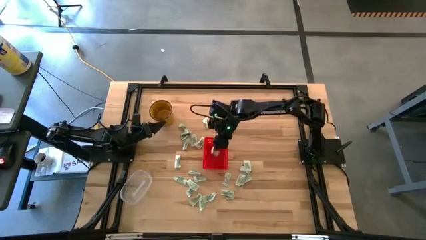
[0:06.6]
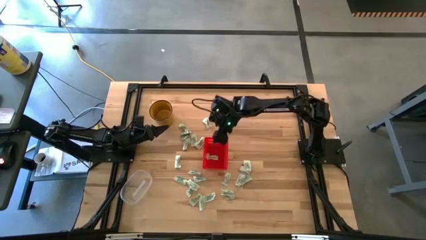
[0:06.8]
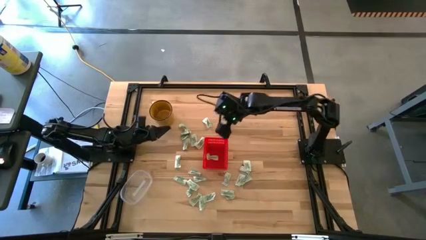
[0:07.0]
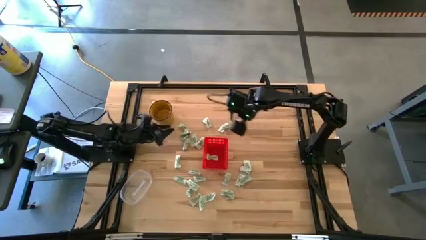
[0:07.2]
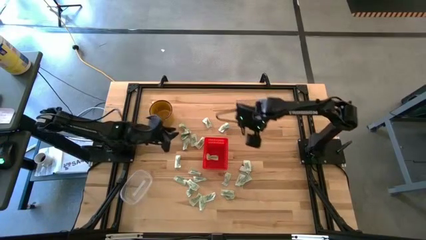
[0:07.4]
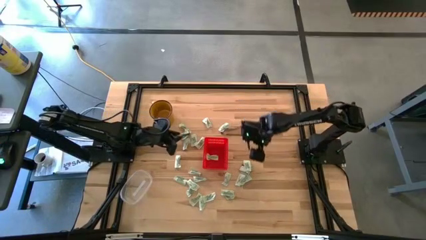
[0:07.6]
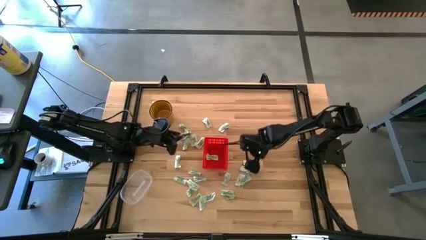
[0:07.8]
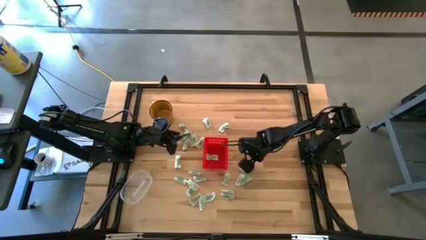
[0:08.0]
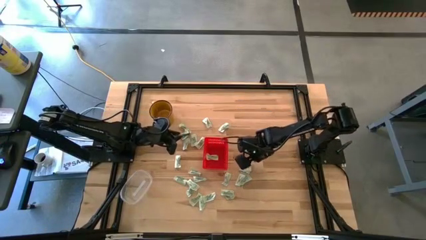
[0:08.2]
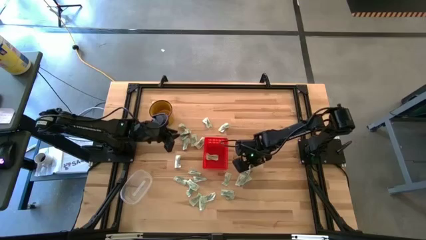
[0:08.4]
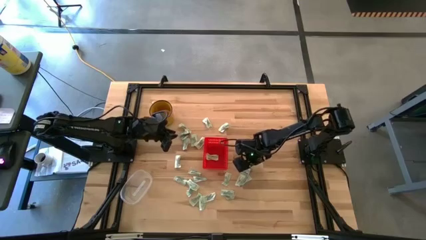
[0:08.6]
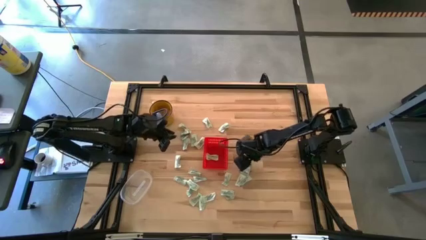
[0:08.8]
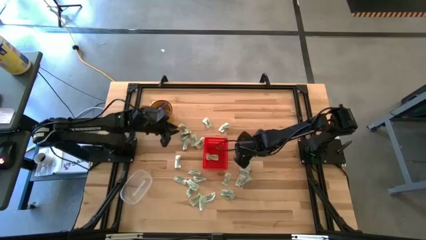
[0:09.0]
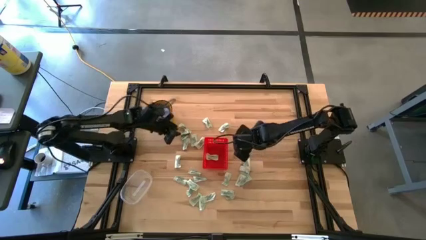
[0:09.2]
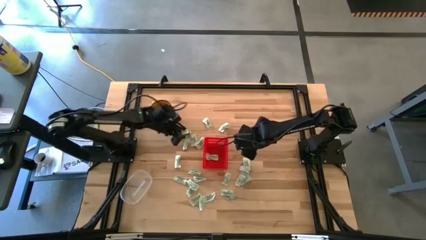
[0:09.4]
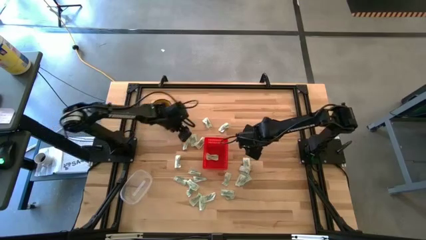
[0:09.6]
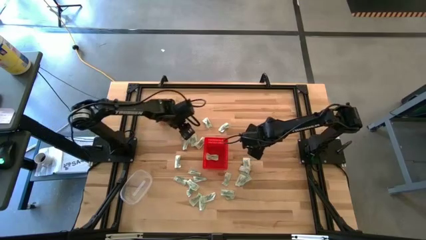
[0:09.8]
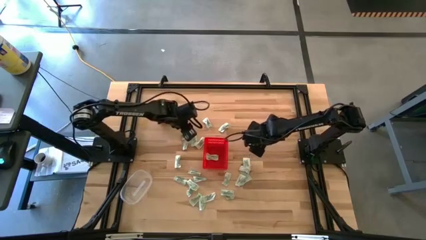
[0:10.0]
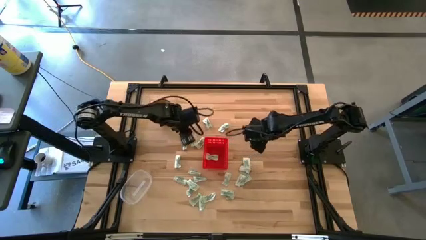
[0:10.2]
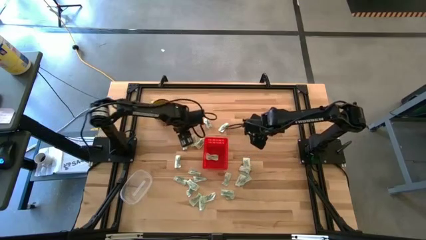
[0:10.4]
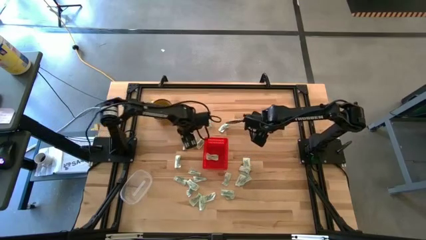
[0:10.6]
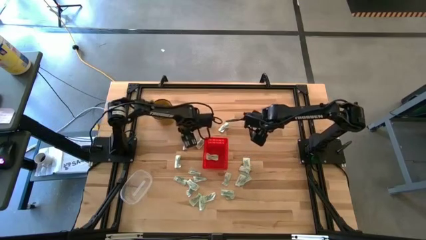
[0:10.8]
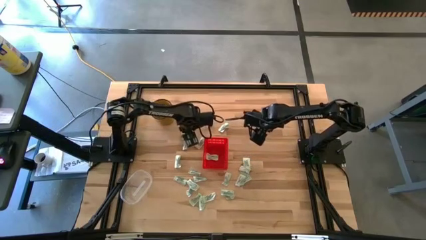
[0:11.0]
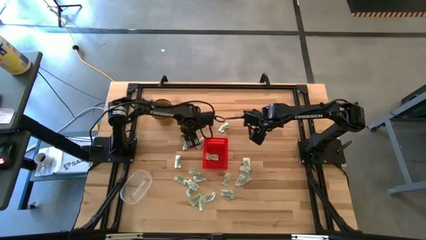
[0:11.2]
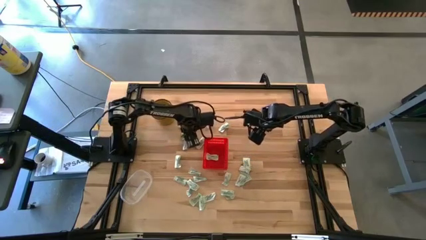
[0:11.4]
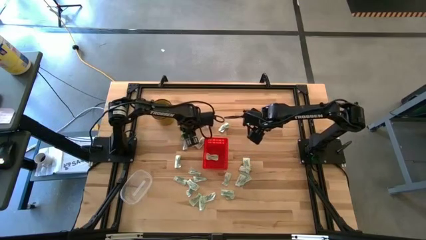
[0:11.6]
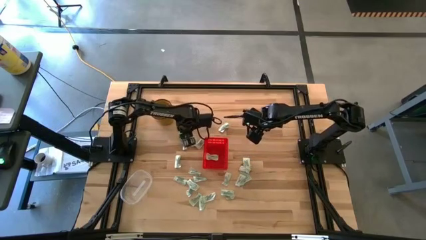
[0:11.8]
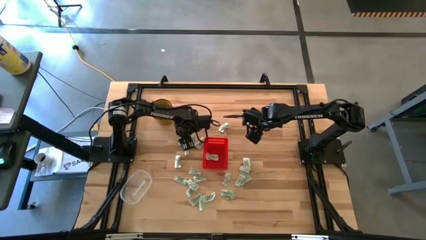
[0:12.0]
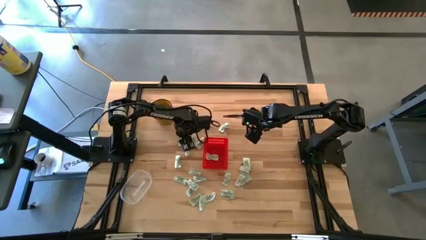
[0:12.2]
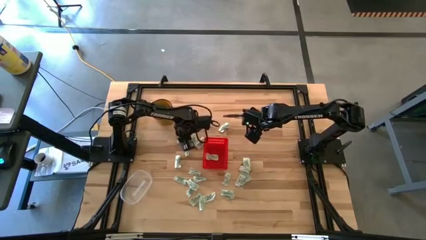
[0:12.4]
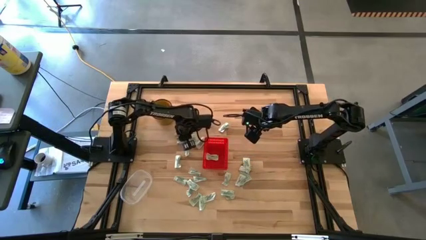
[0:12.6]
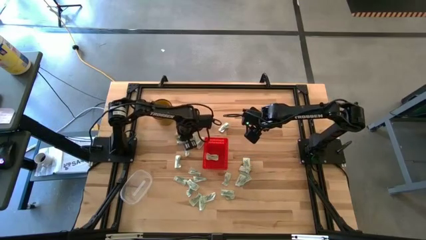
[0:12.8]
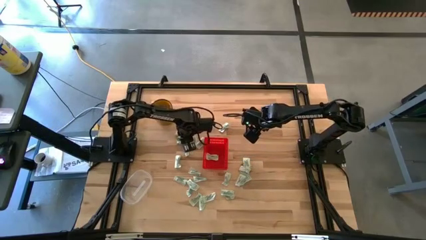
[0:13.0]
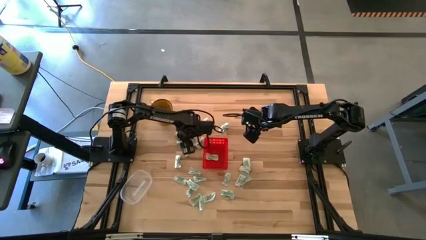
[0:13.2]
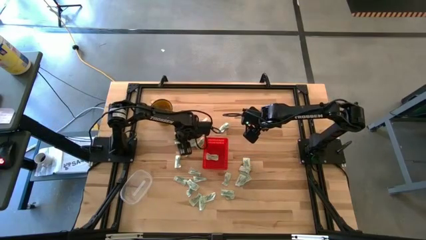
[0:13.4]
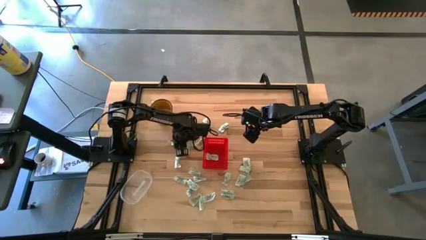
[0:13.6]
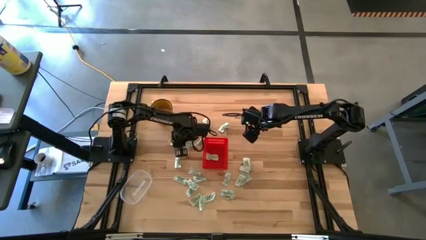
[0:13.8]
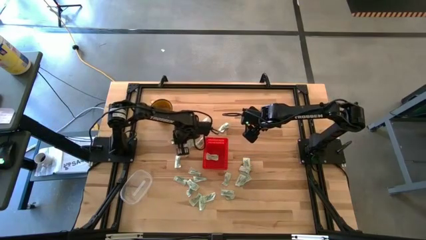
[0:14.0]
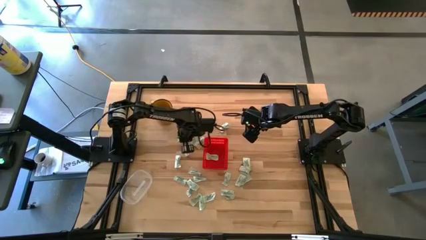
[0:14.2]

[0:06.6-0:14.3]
Task: Pick and place Stevia / Truvia into bins
Put the white stevia packet into the red basket

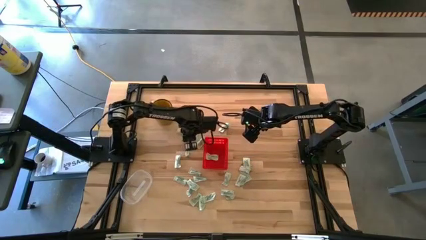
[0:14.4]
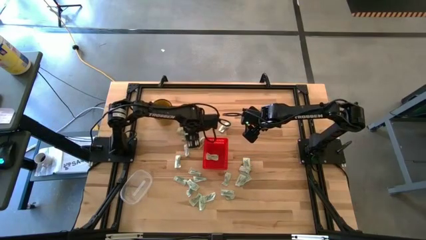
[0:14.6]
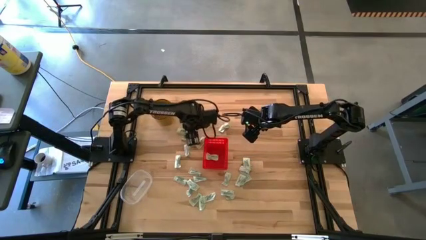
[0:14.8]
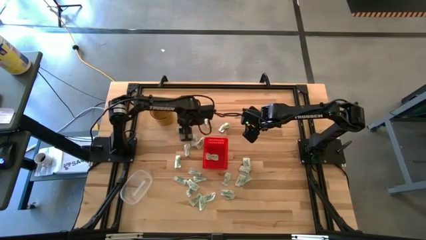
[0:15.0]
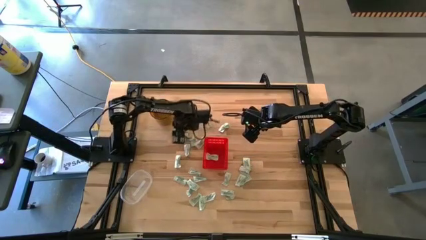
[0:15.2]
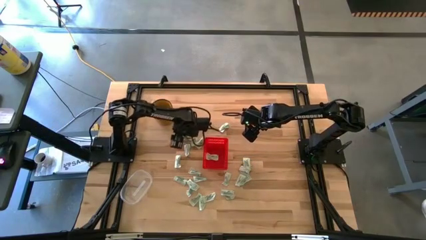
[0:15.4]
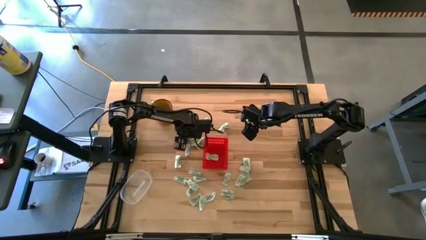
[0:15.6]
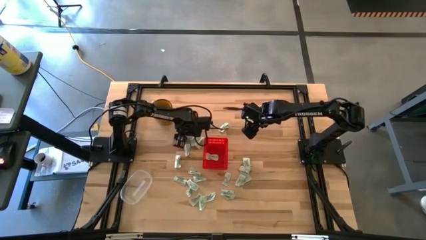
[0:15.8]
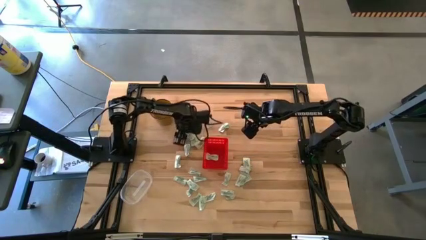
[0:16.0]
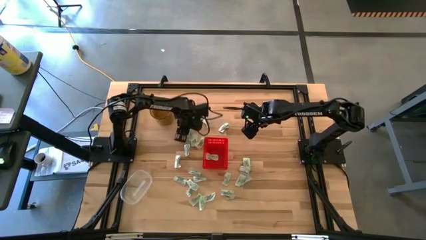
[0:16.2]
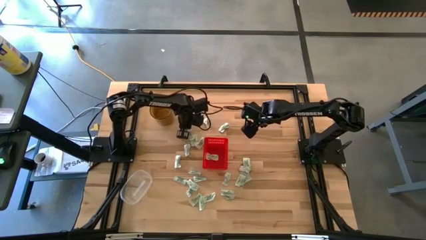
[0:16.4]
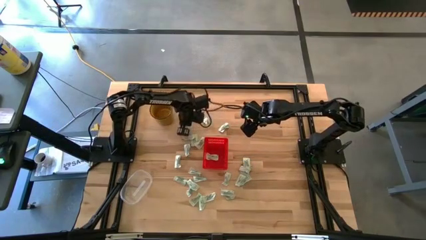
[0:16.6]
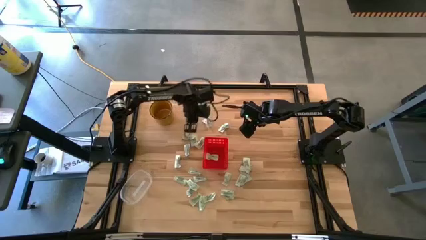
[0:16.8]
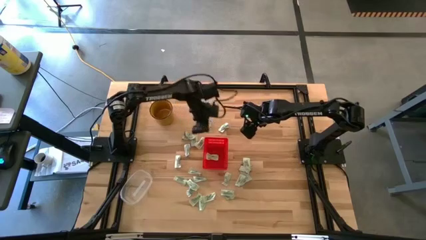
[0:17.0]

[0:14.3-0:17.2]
Put the white stevia packet into the red basket

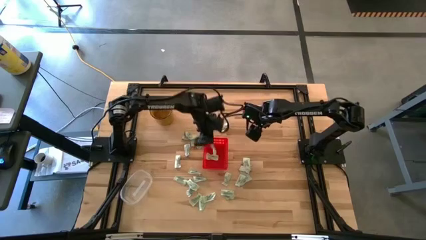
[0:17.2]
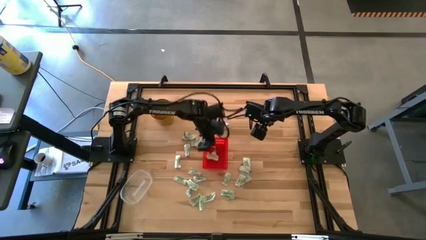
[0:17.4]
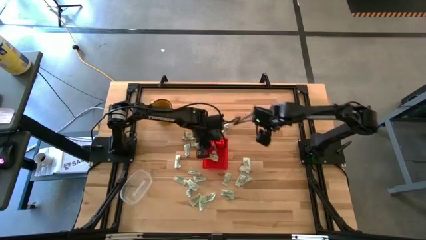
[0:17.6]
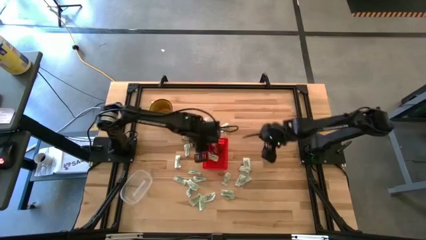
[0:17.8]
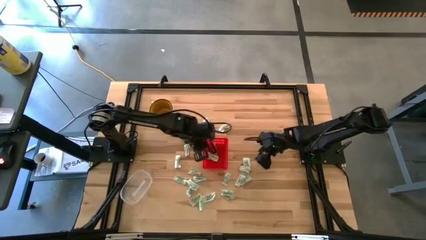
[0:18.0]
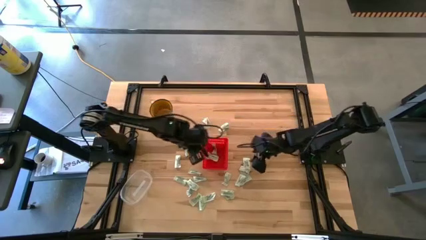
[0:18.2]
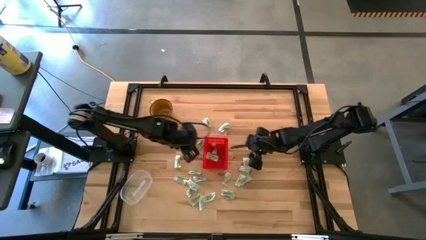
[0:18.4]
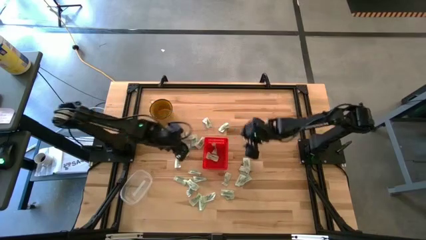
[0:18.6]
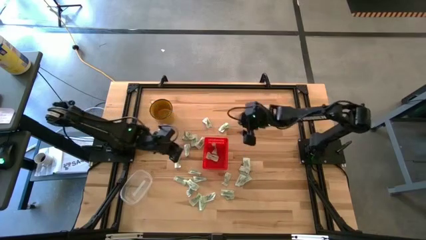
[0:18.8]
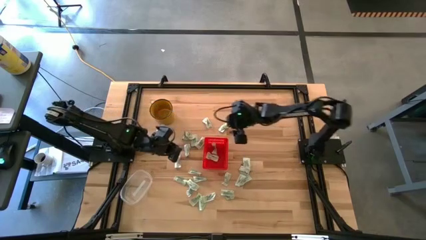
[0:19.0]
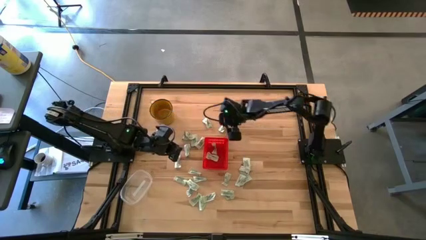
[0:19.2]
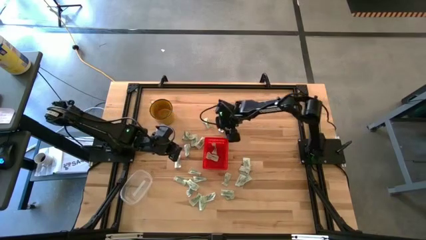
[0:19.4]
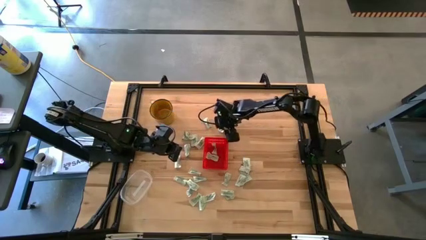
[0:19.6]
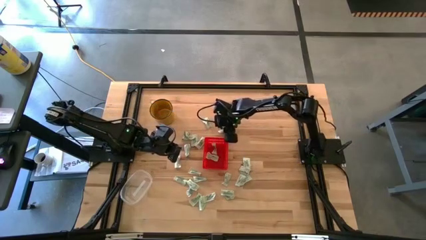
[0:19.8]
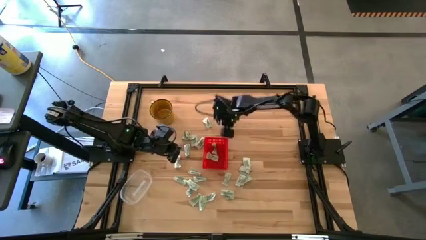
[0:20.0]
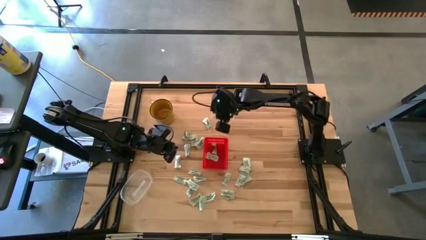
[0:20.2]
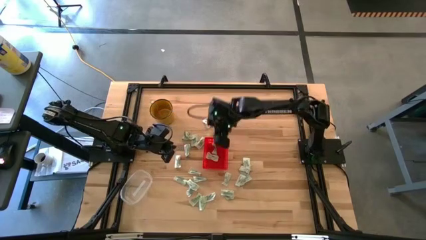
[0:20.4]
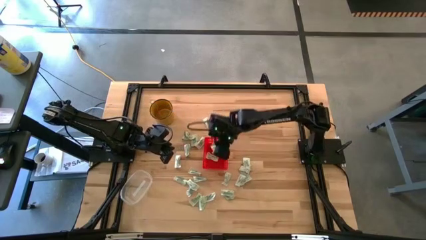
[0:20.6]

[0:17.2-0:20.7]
Put the white stevia packet into the red basket

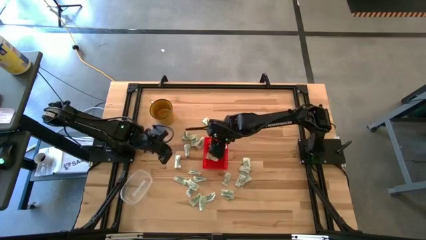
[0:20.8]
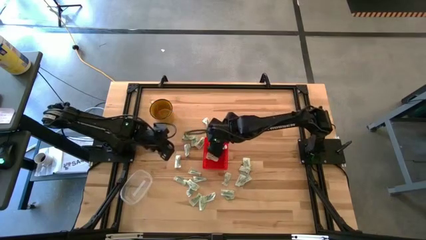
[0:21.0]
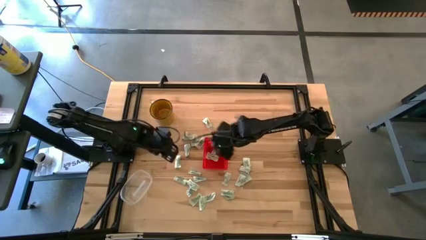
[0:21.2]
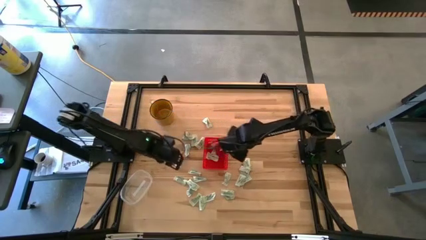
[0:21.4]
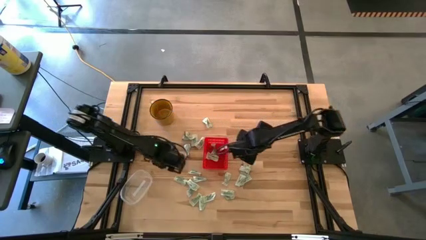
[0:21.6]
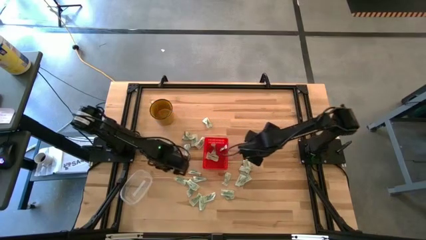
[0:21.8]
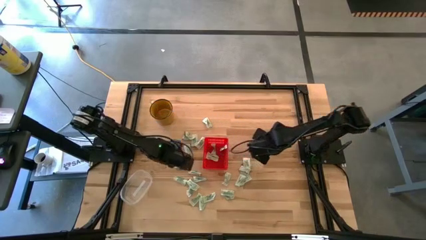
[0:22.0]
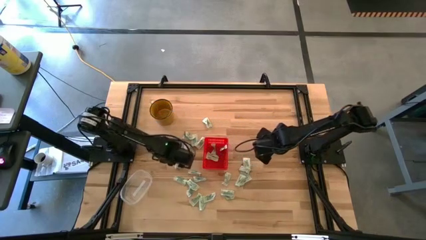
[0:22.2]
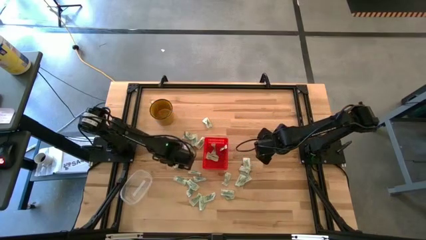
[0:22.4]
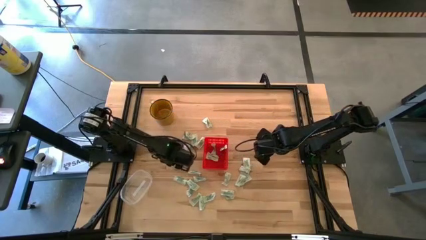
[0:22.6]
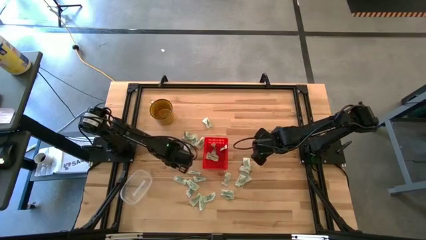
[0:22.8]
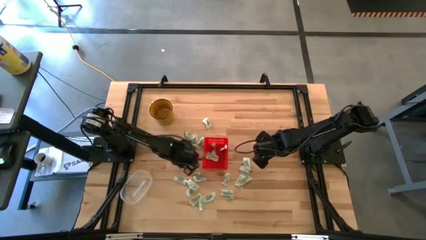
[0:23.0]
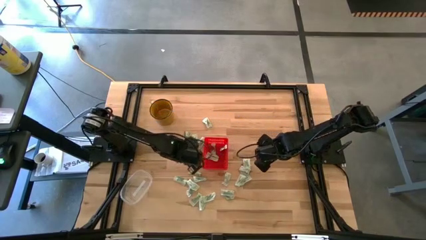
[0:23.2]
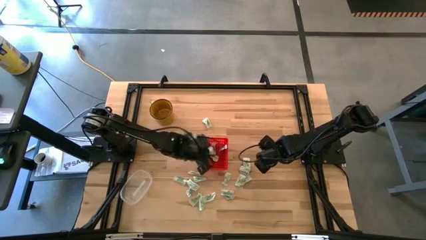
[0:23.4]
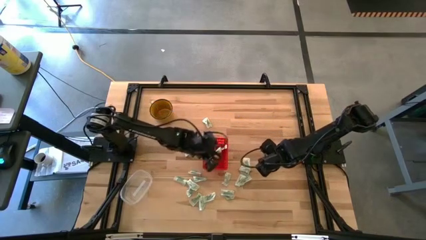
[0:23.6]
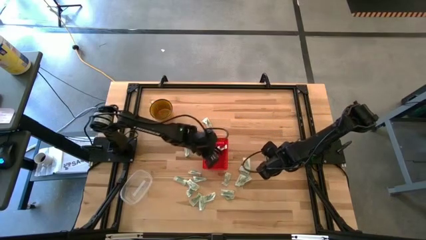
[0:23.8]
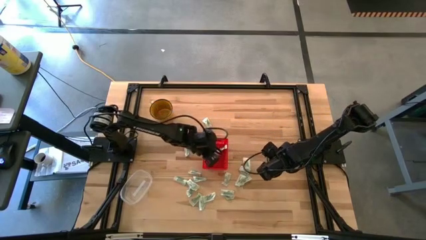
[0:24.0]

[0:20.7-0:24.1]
Put the white stevia packet into the red basket
